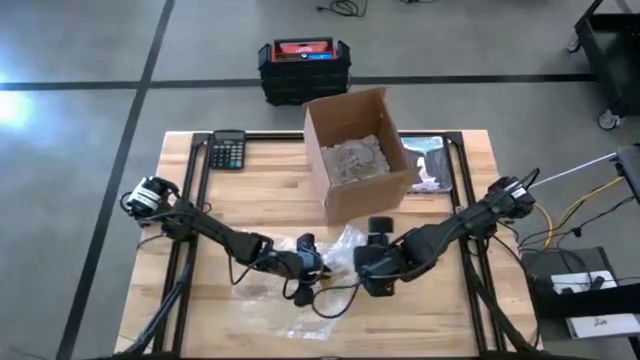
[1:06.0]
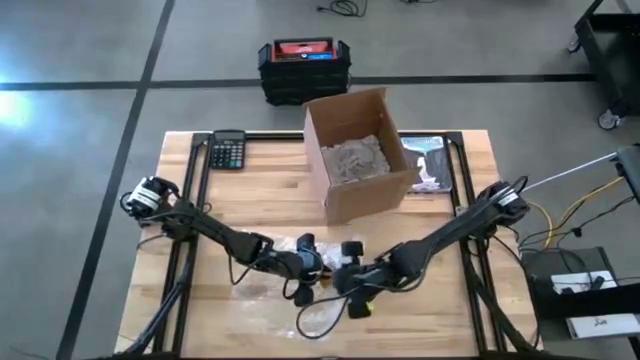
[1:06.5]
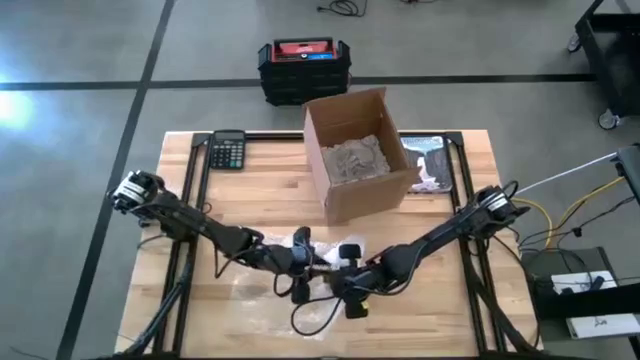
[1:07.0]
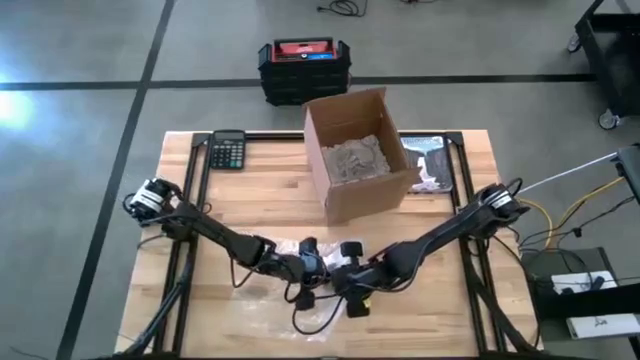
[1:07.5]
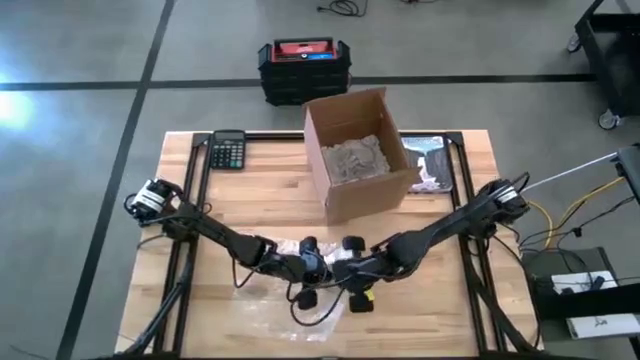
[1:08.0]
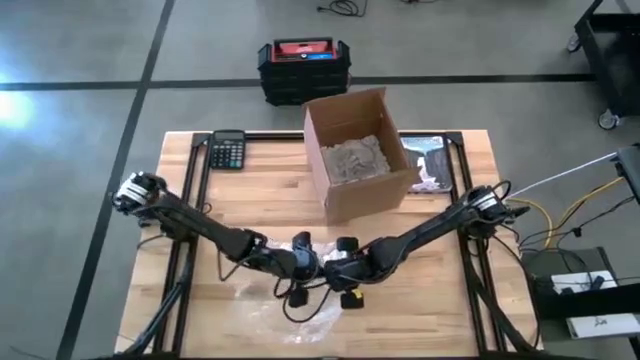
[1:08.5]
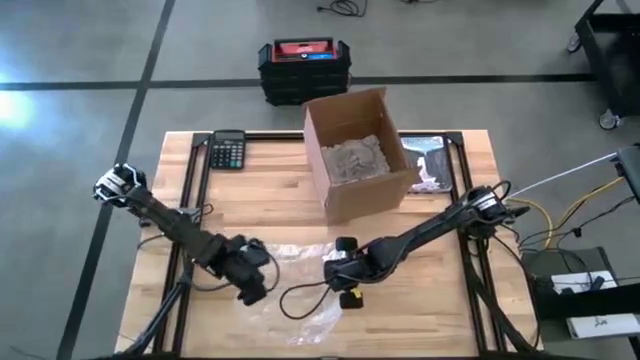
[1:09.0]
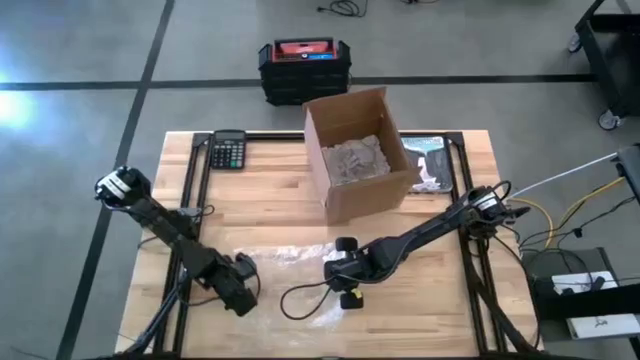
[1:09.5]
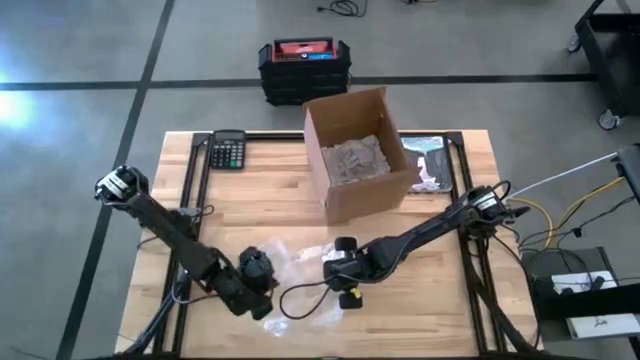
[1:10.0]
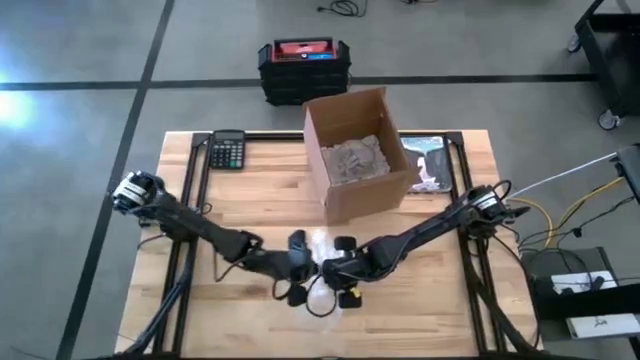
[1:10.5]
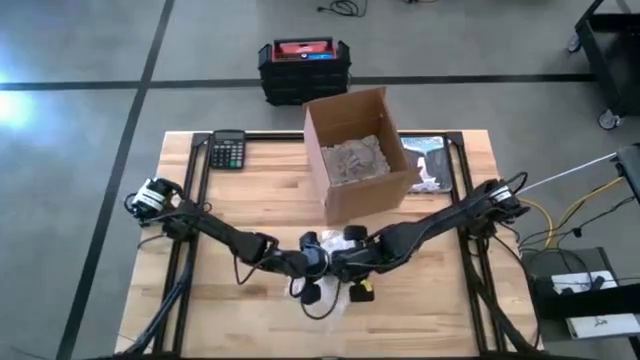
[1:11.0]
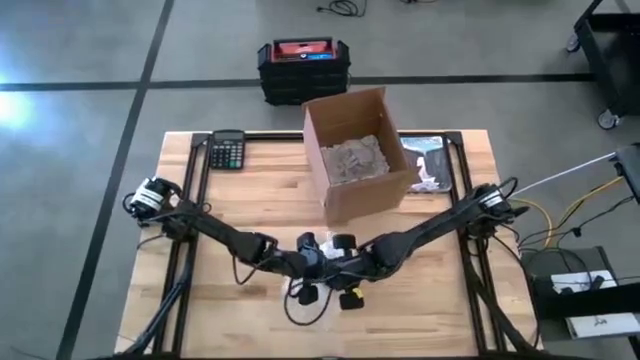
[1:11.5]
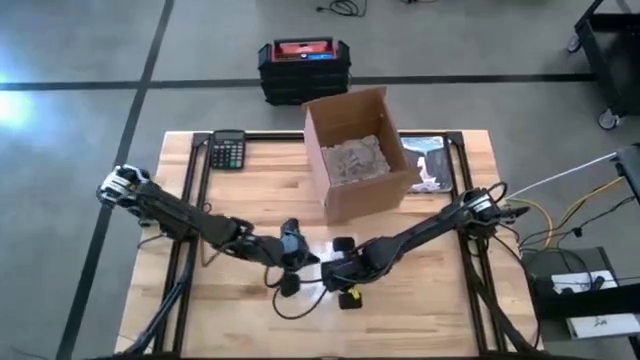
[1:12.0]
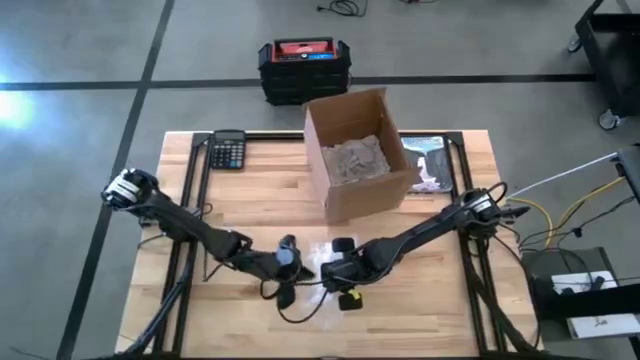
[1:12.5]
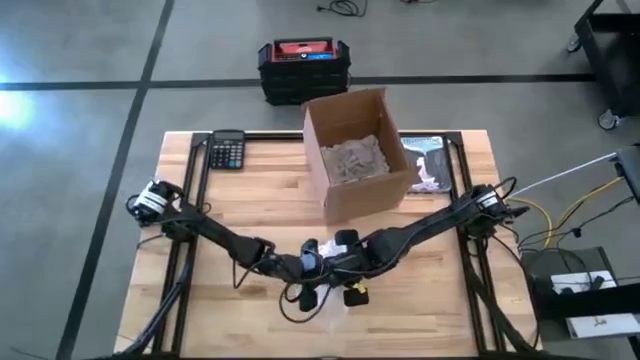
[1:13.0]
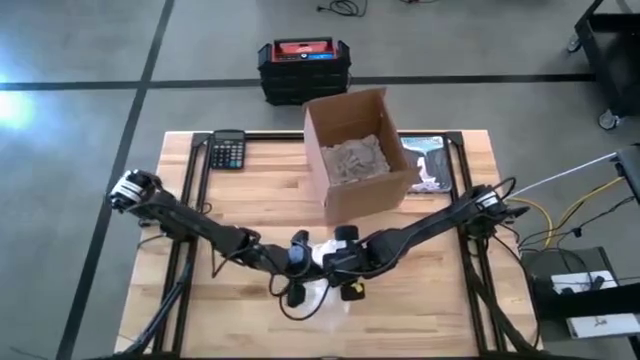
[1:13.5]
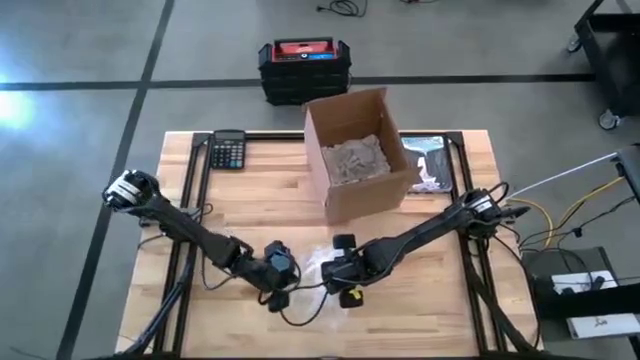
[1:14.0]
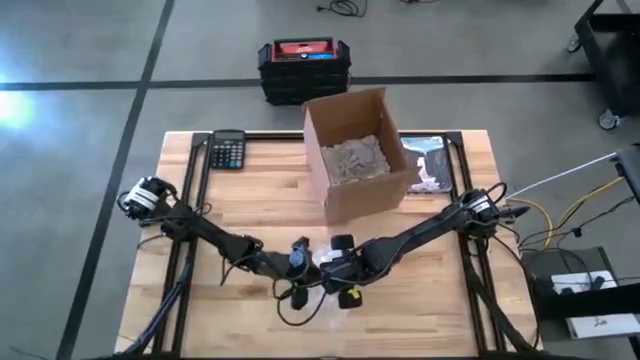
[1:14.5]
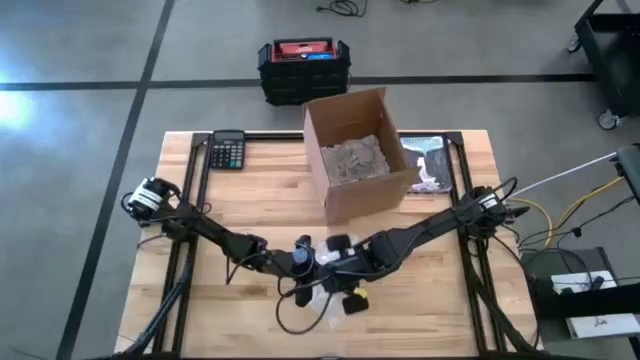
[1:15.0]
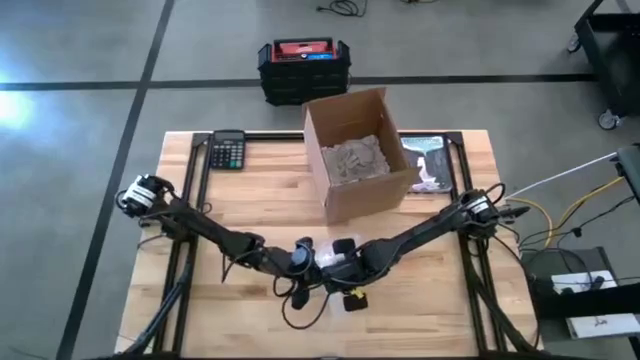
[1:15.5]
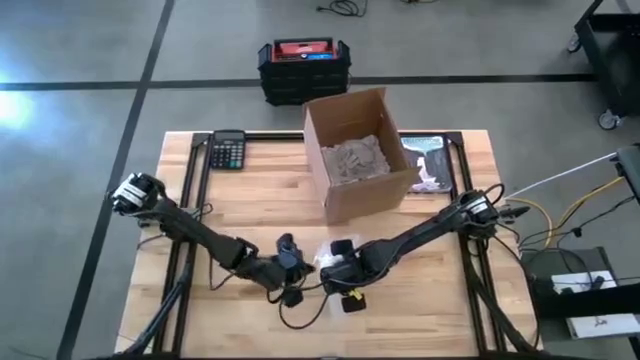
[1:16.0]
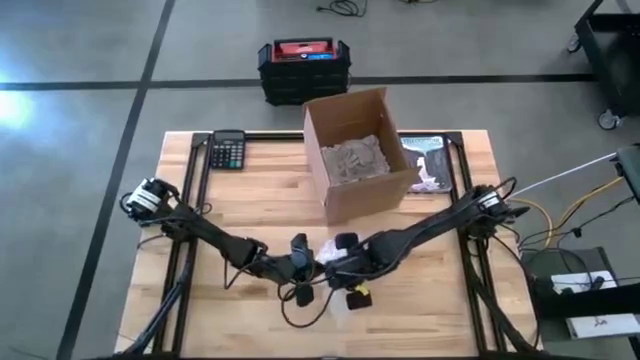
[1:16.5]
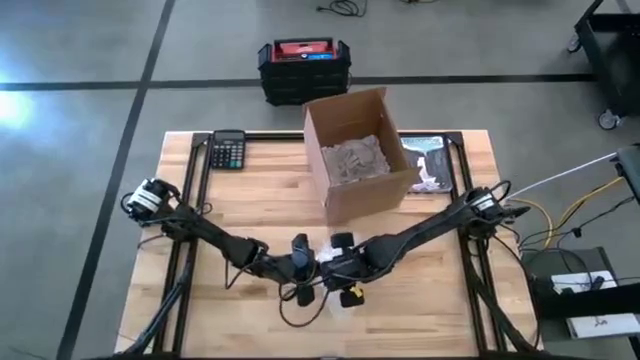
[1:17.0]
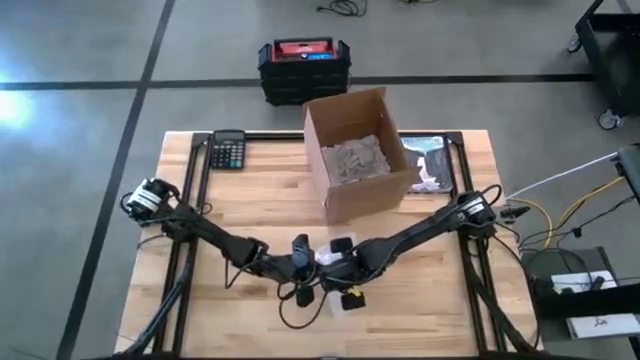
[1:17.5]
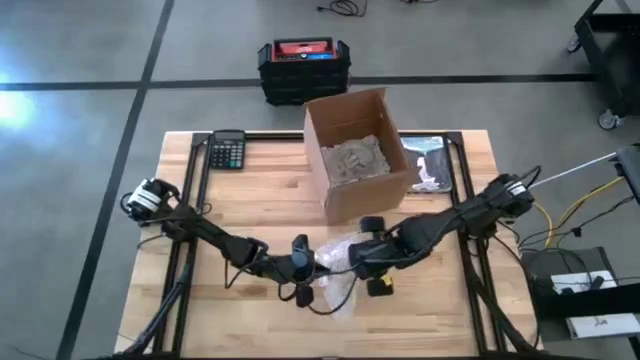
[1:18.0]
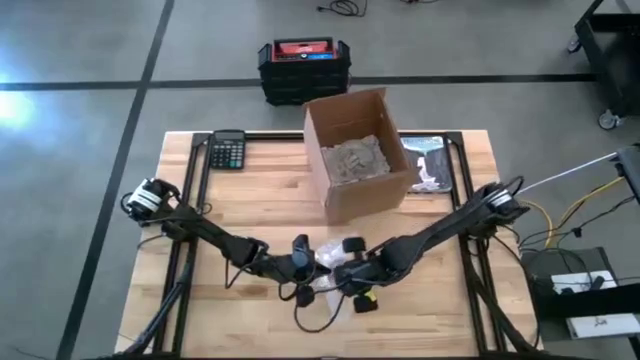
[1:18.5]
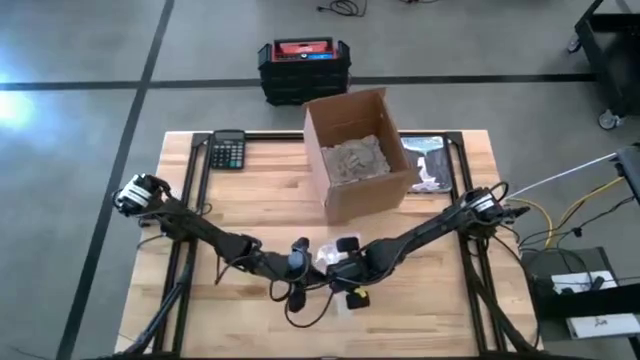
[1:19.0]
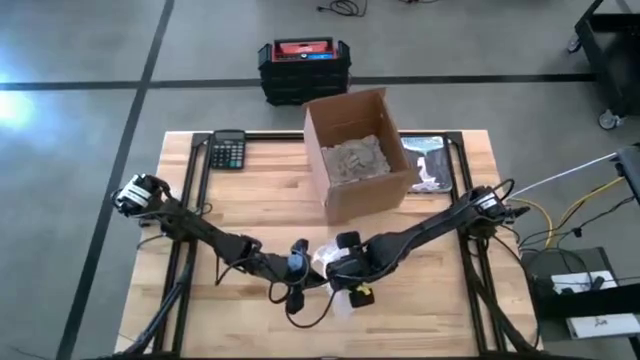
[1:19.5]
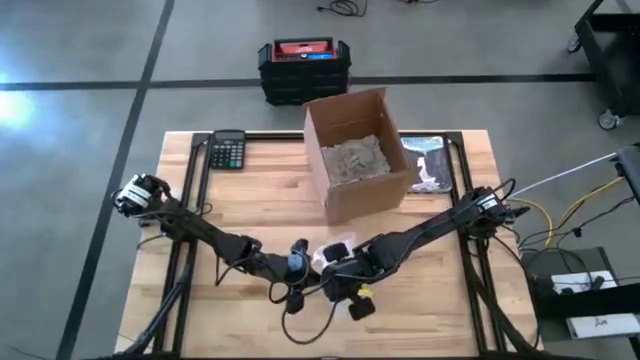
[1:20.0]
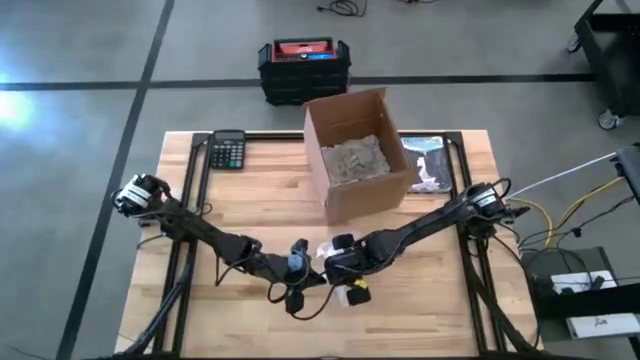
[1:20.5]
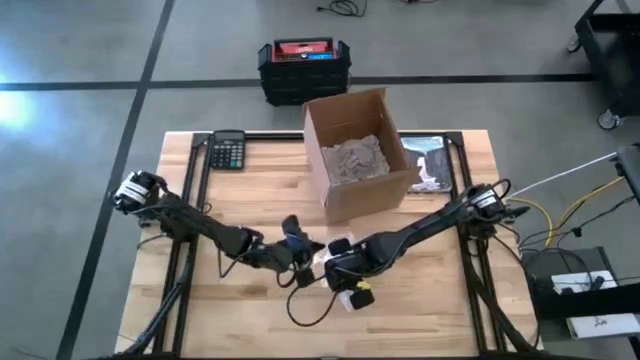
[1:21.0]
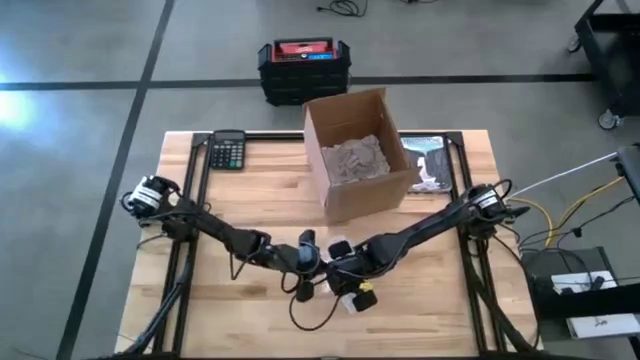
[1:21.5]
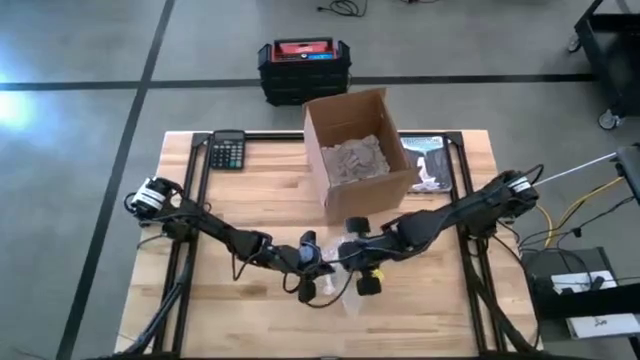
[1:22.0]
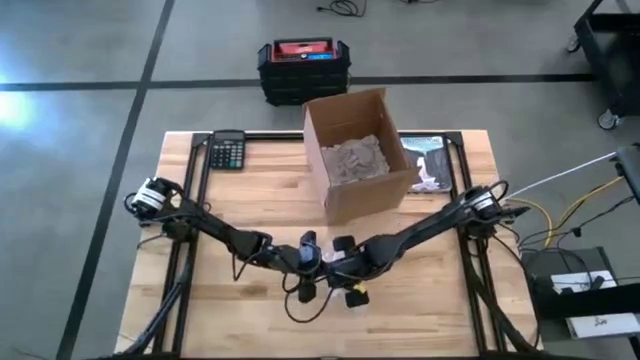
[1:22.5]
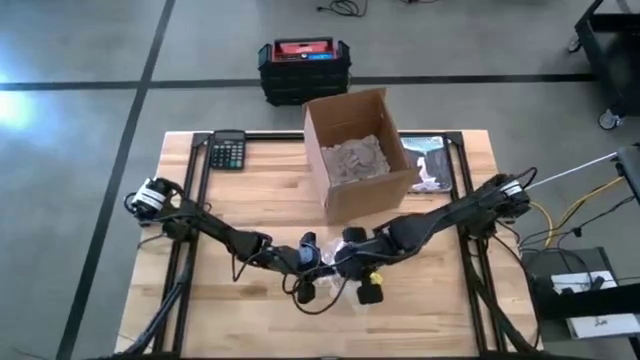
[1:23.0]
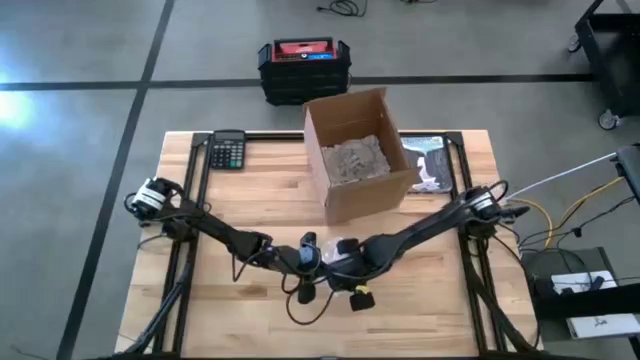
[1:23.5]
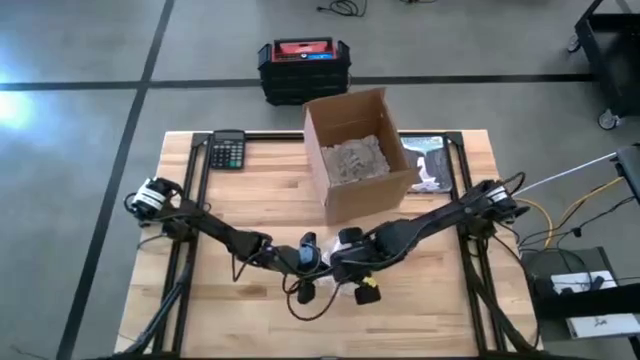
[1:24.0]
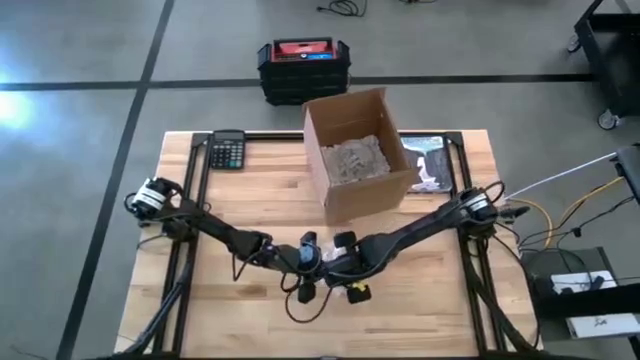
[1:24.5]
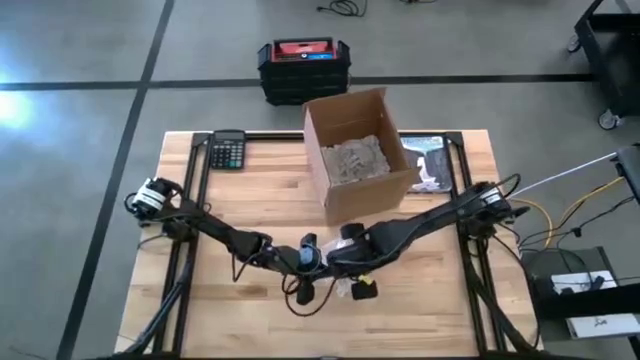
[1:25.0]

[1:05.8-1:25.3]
Task: wrap mug
Wrap the yellow cup in bubble wrap

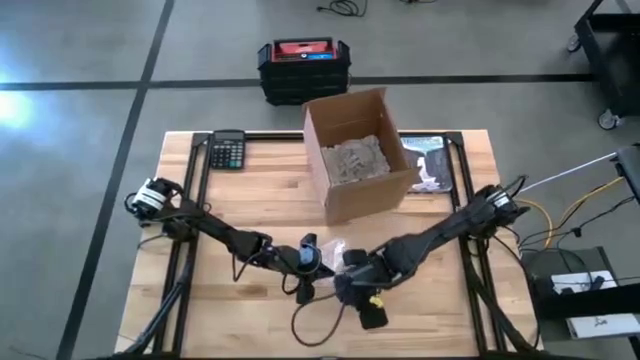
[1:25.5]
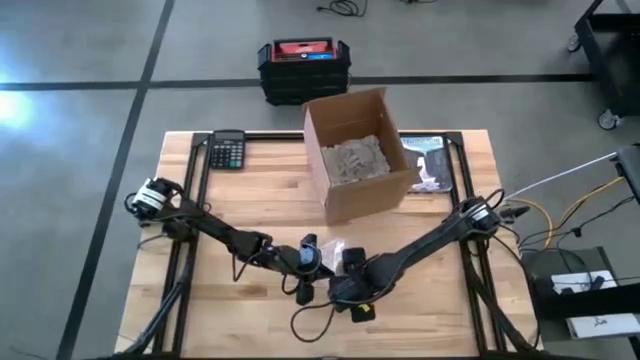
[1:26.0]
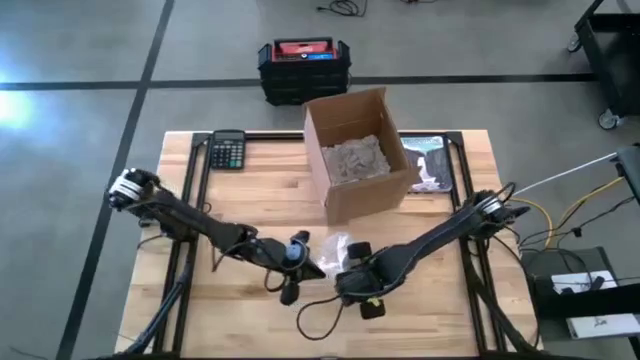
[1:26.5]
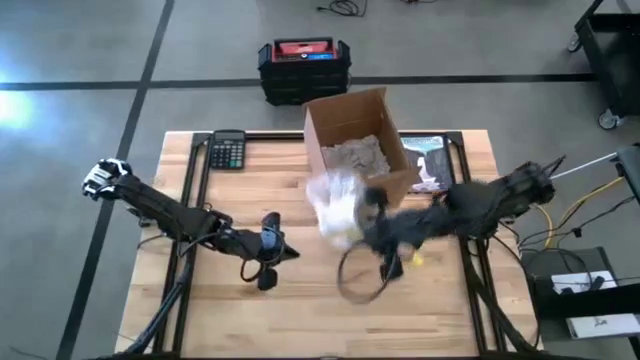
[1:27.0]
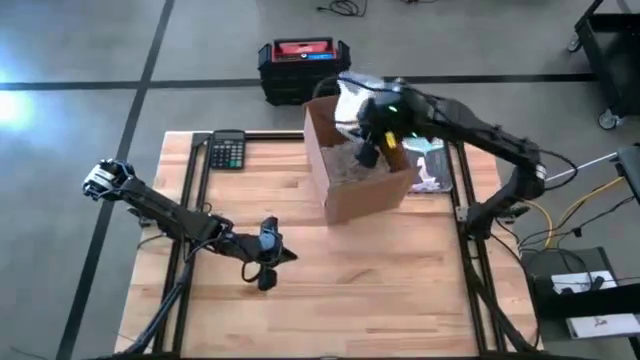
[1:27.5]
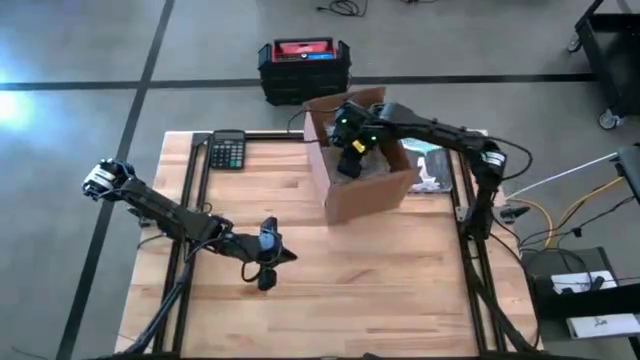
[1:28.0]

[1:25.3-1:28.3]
Put the wrapped yellow cup into the cardboard box
